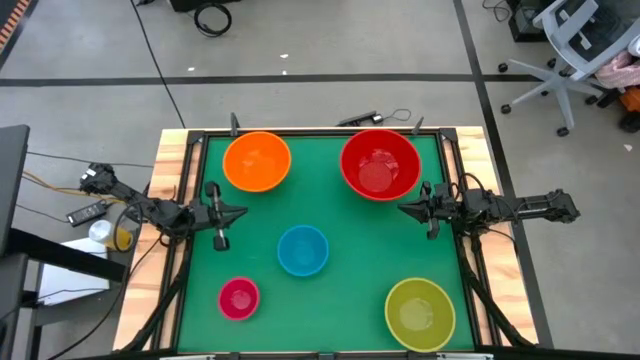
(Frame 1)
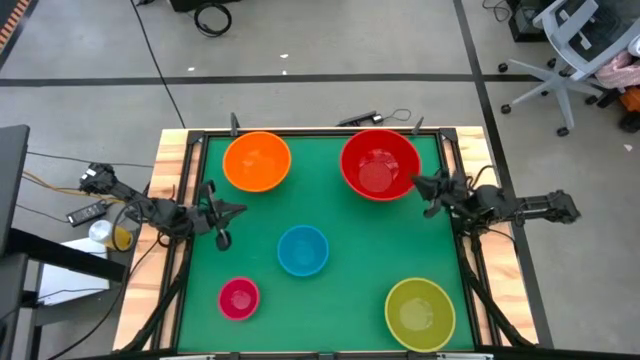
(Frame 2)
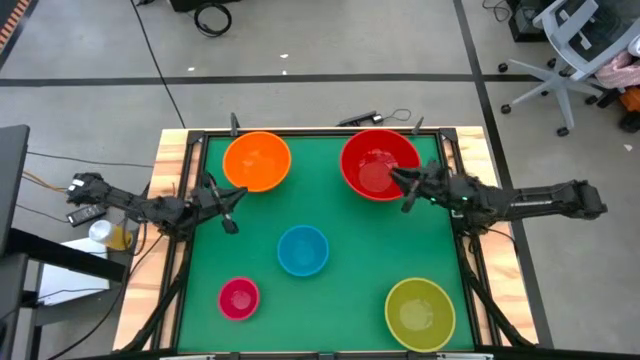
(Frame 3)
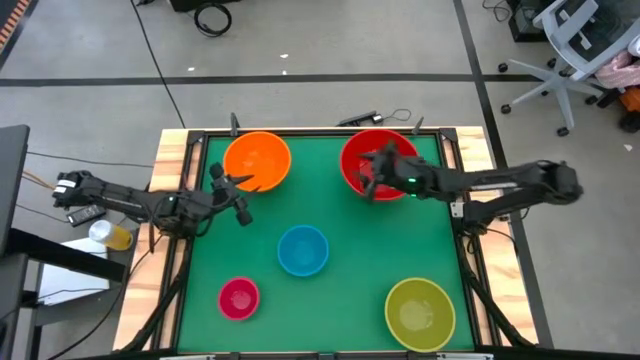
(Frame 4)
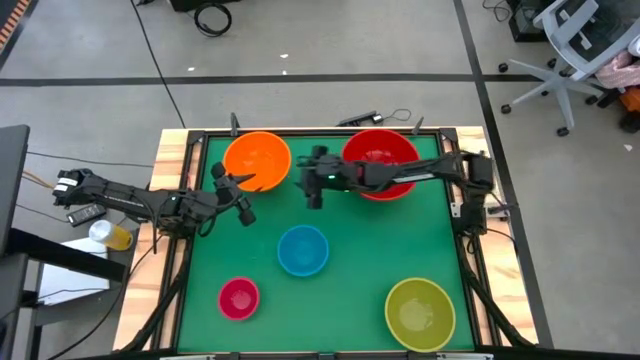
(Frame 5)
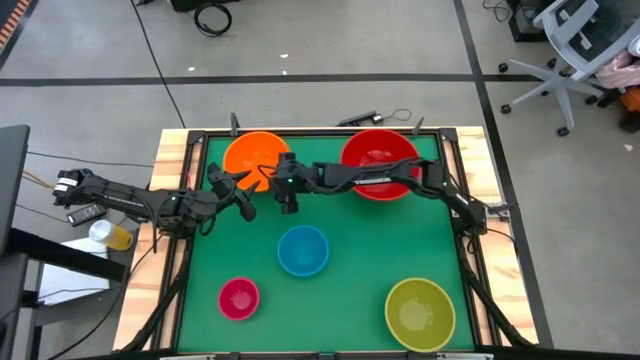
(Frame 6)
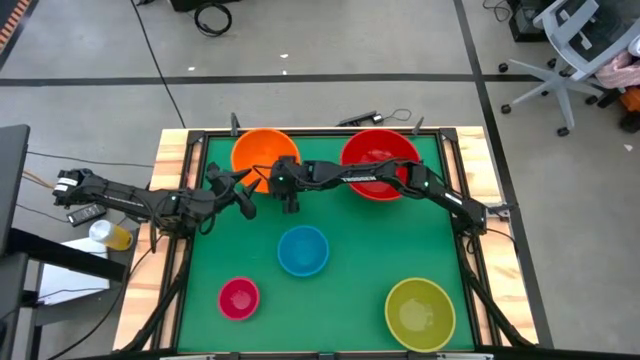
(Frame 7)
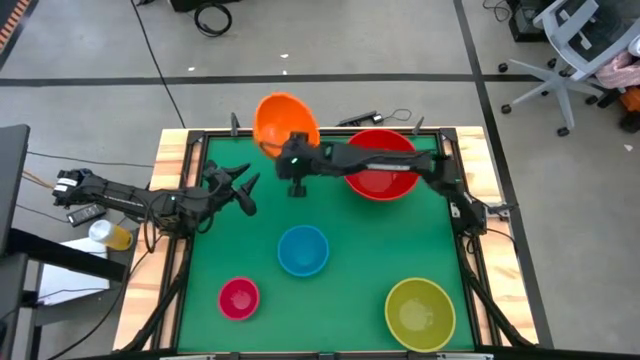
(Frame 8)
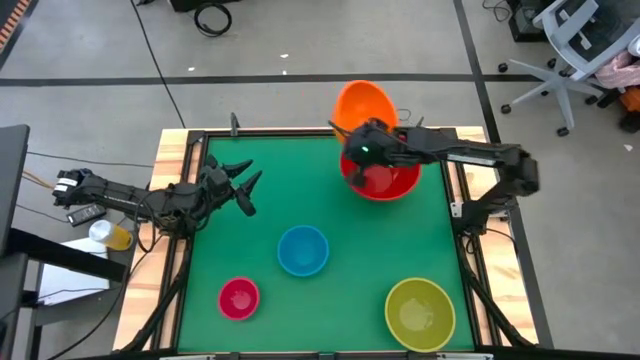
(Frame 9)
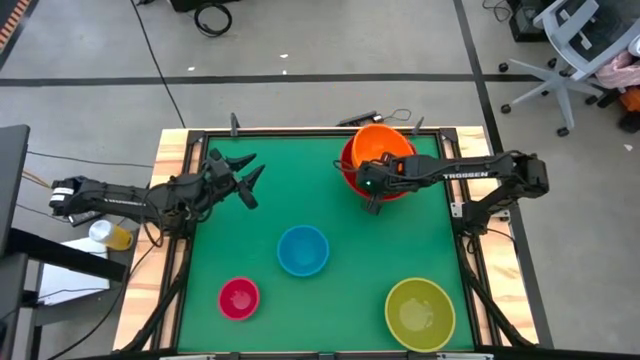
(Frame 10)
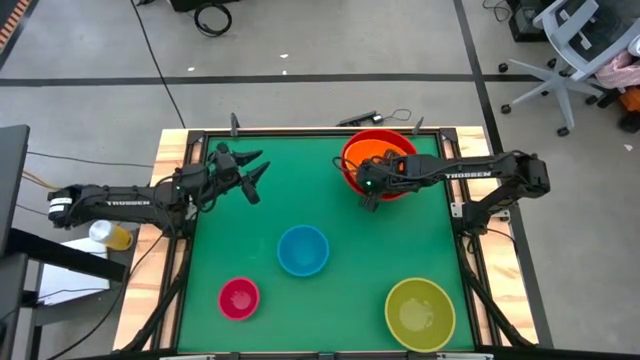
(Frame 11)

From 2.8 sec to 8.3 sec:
Stack the orange bowl on top of the red bowl

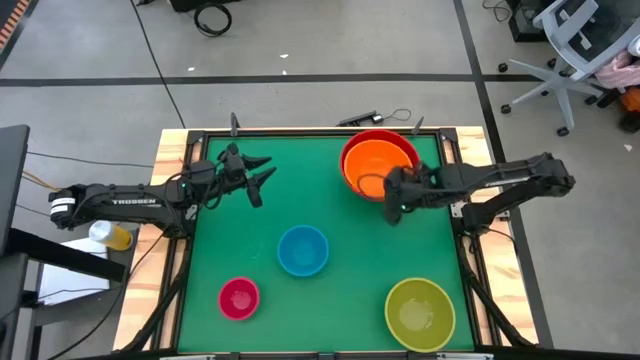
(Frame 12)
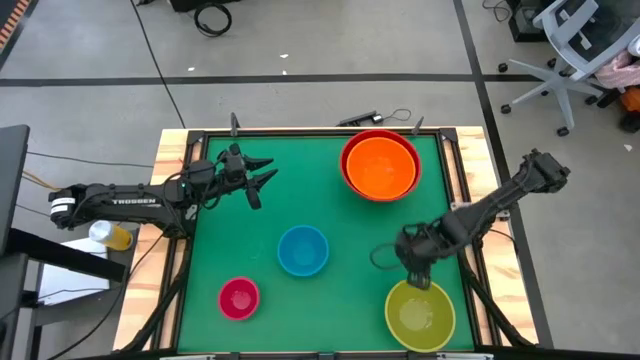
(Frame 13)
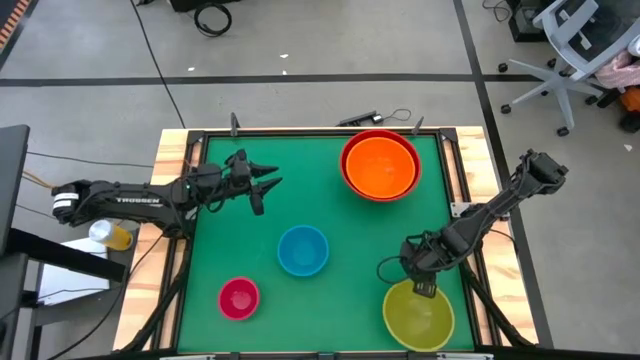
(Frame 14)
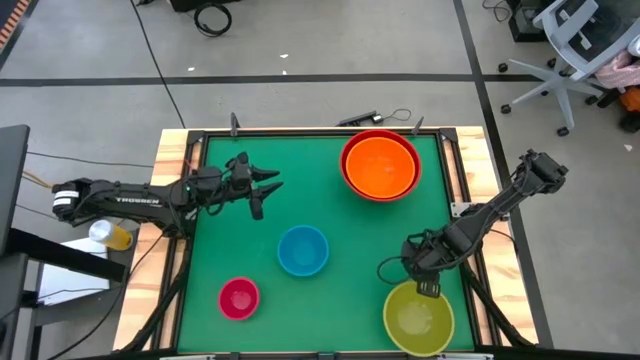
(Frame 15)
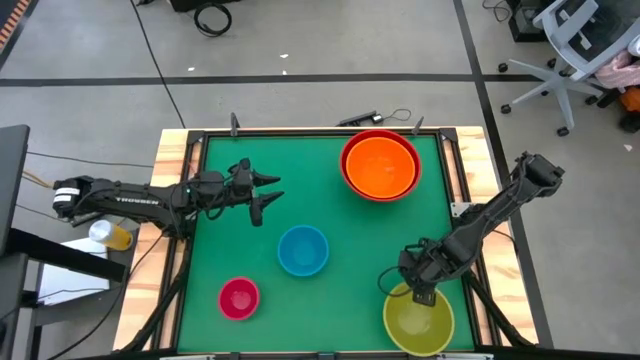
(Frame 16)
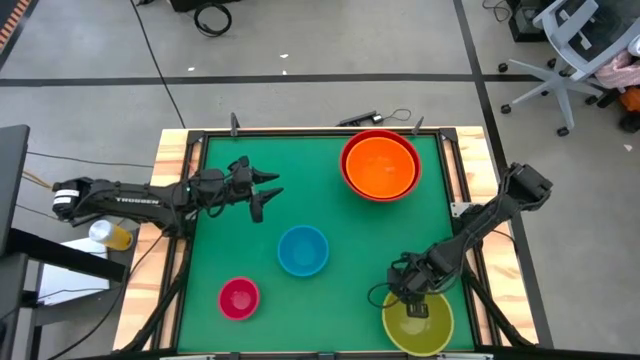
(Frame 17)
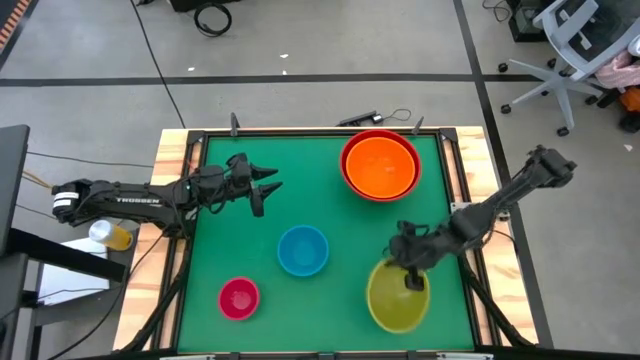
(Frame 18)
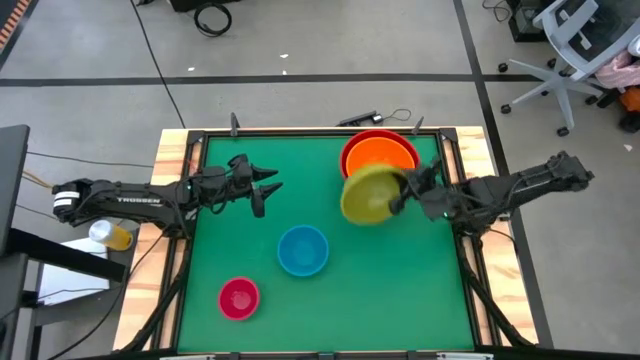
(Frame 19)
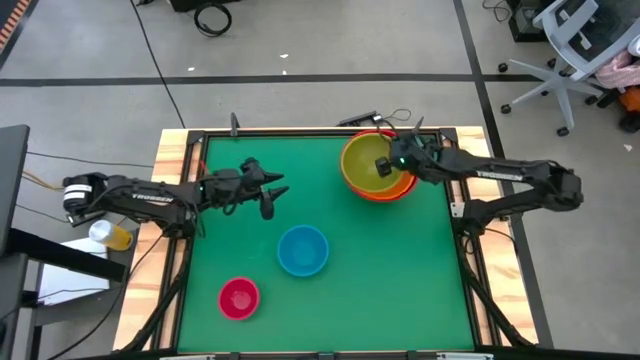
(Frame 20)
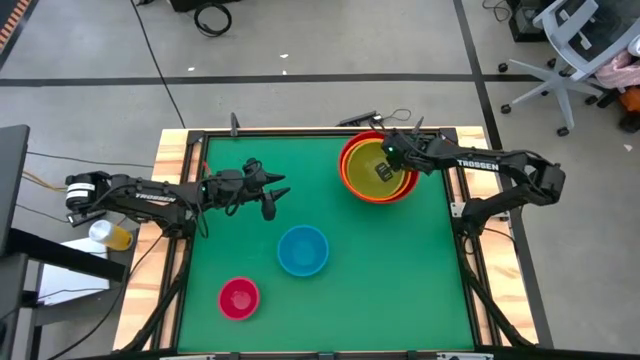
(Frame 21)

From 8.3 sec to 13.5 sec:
Stack the green bowl on top of the orange bowl

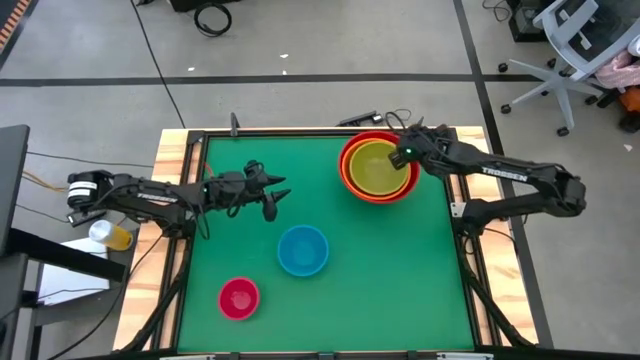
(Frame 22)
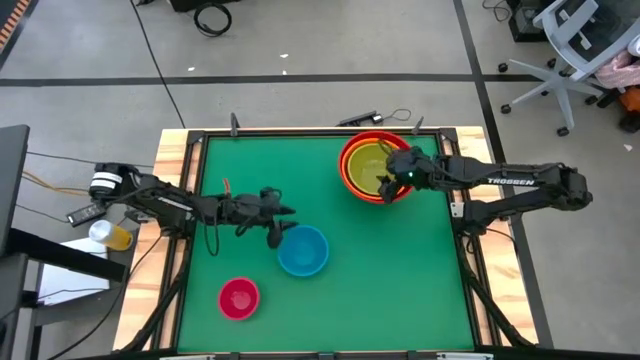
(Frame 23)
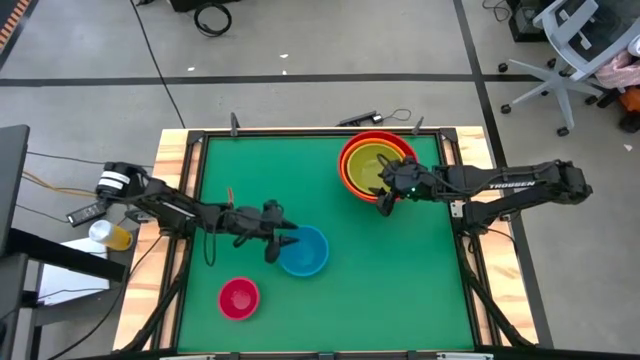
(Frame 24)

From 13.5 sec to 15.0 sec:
Stack the blue bowl on top of the green bowl

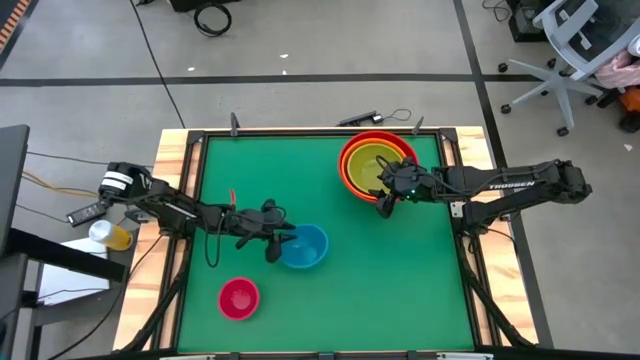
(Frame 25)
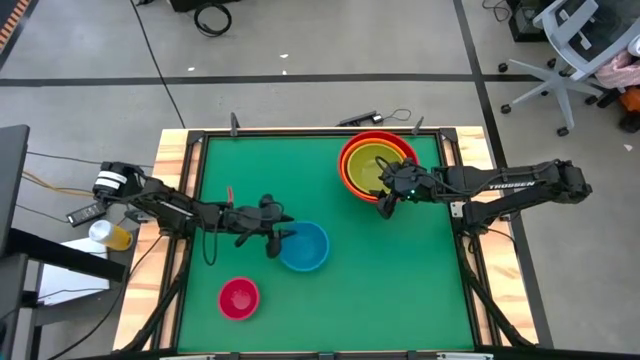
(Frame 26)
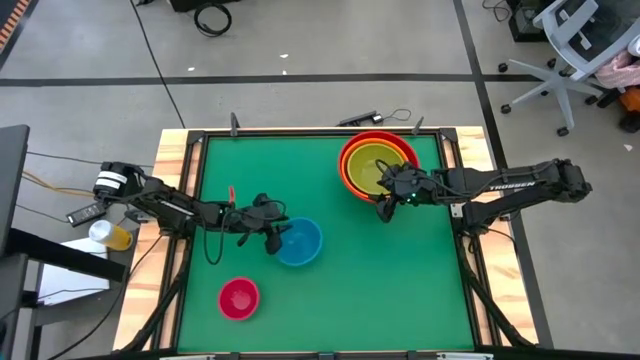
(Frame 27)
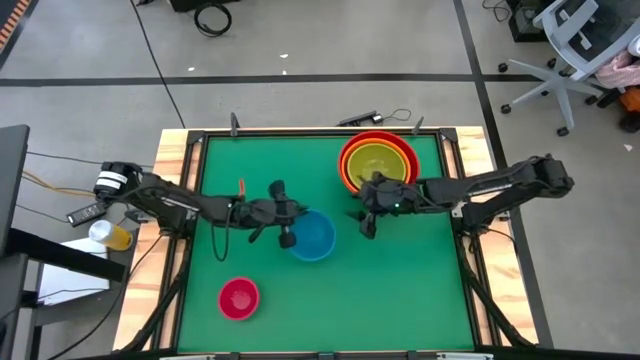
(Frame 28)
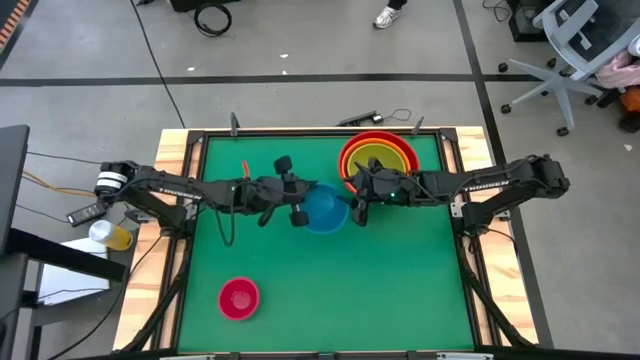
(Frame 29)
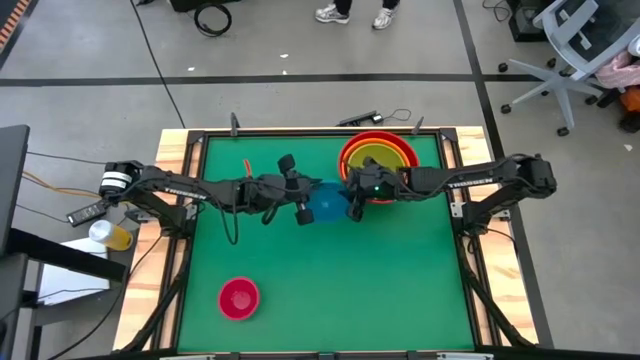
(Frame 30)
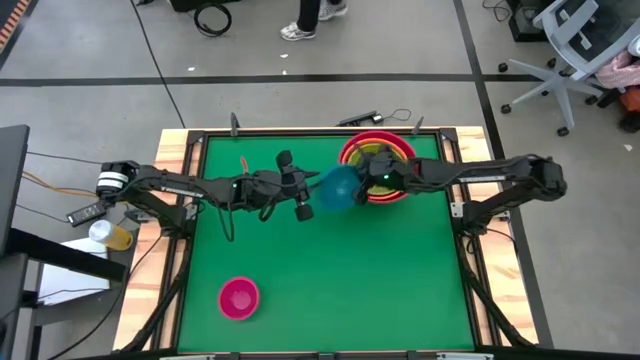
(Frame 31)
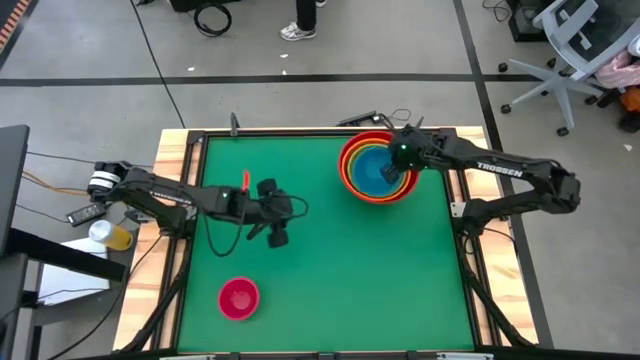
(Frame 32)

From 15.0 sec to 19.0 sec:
Stack the blue bowl on top of the green bowl

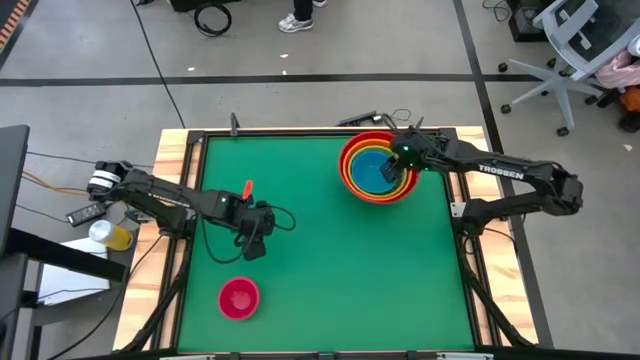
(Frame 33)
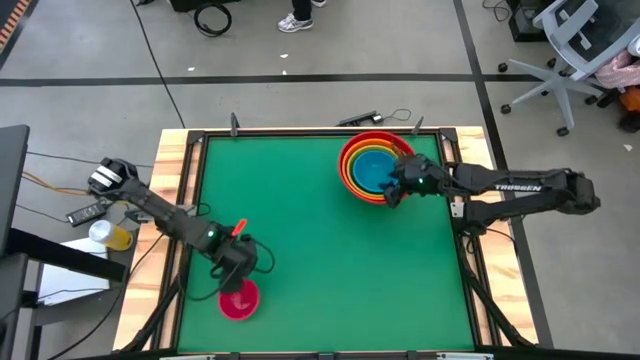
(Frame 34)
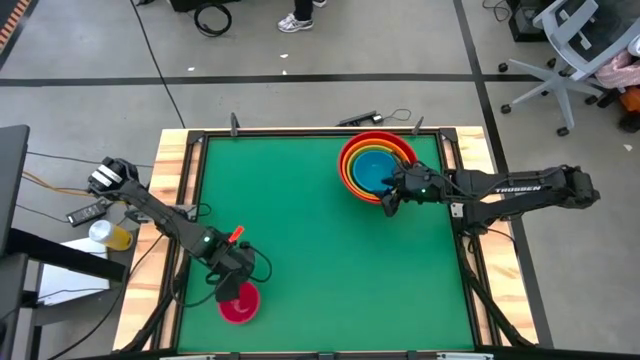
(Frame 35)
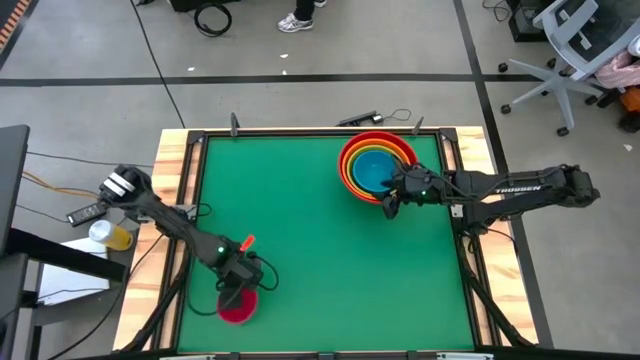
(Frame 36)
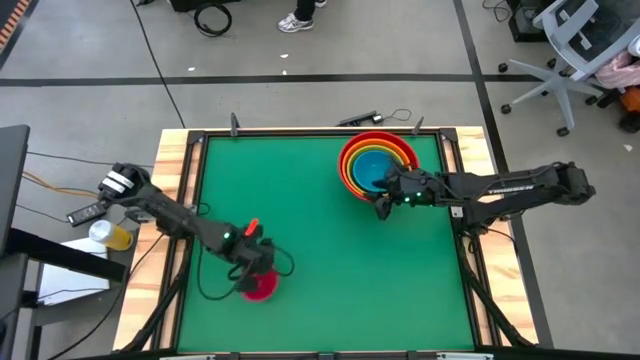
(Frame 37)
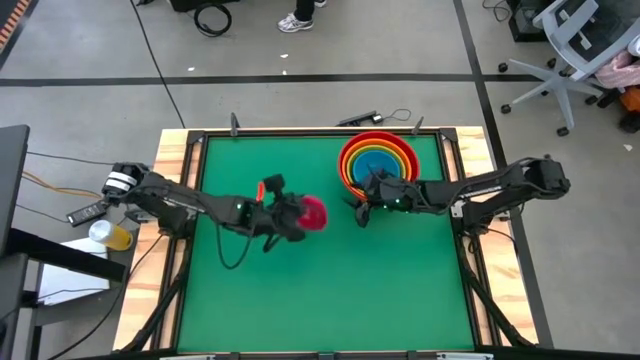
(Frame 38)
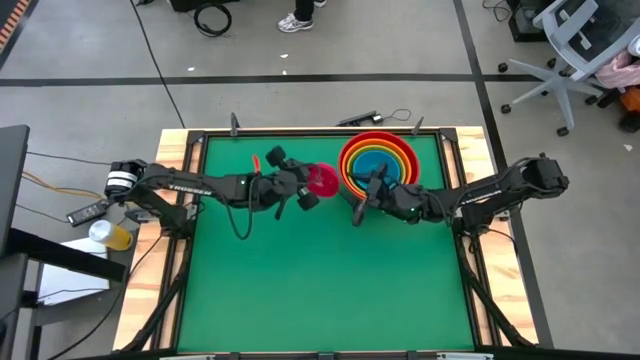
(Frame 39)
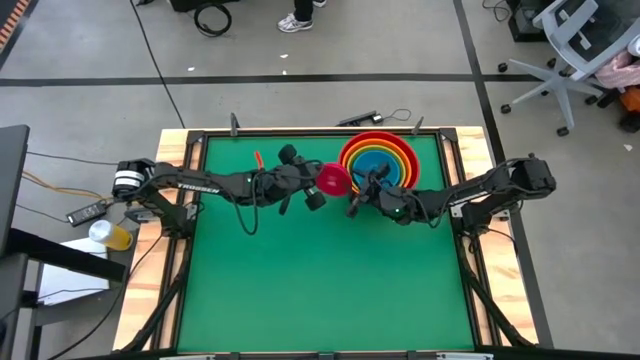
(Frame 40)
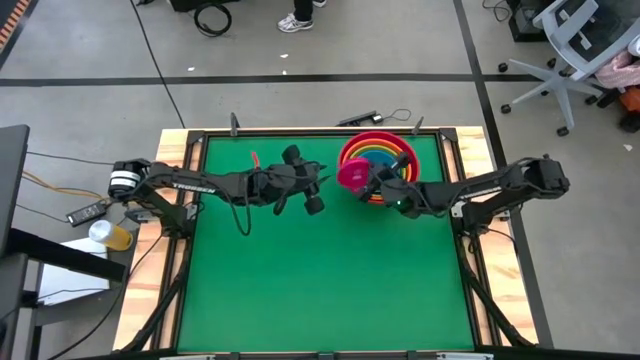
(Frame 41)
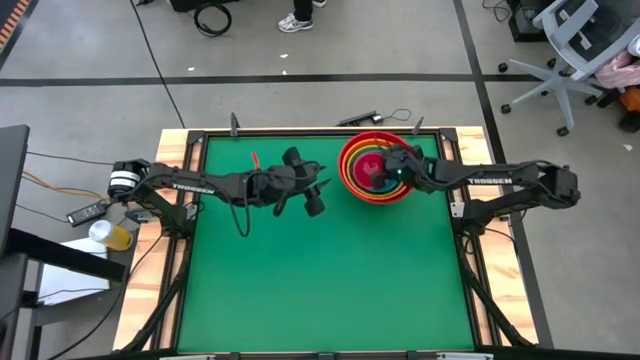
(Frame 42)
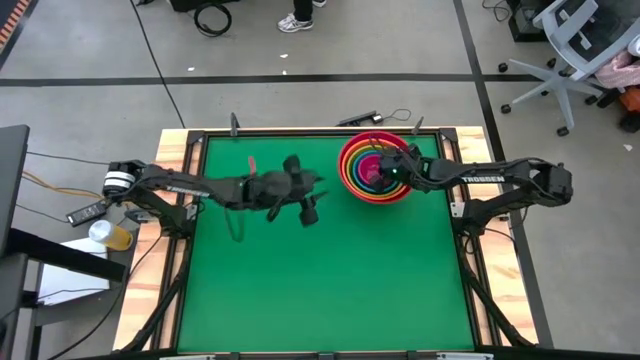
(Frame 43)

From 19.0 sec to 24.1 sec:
Stack the pink bowl on top of the blue bowl
